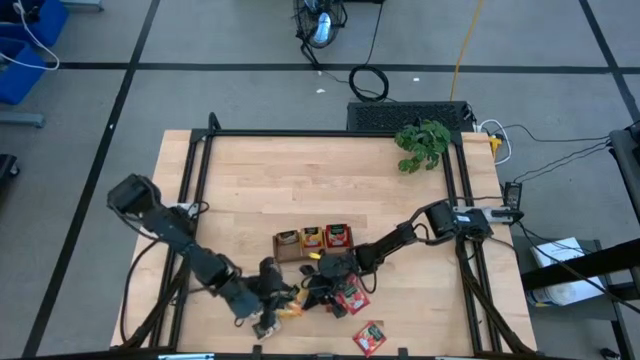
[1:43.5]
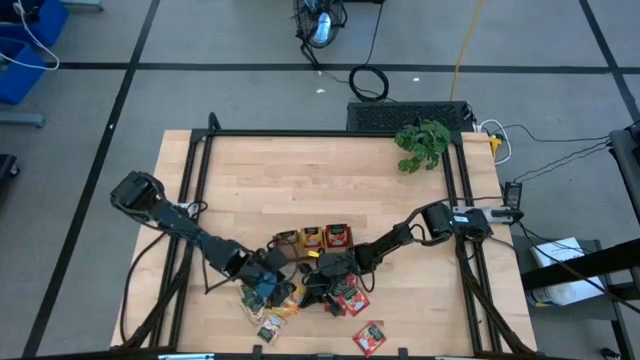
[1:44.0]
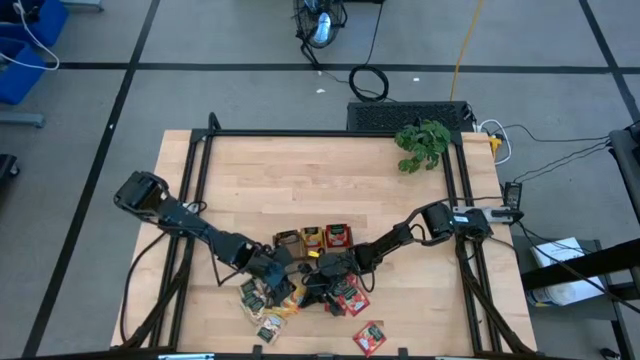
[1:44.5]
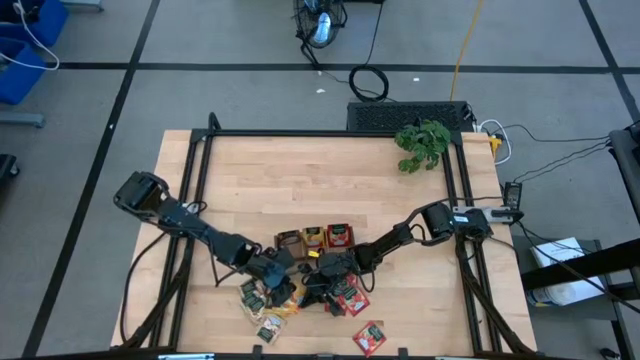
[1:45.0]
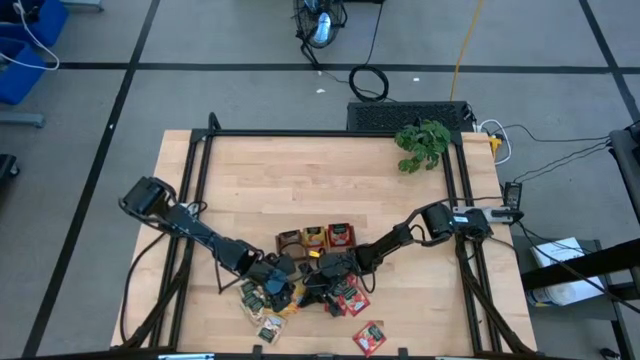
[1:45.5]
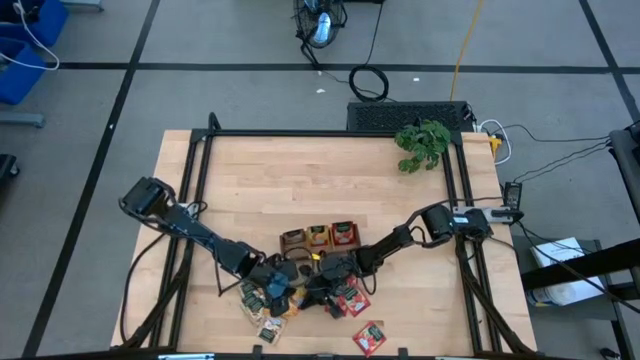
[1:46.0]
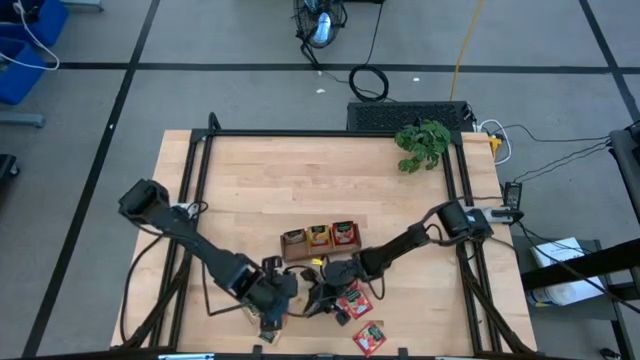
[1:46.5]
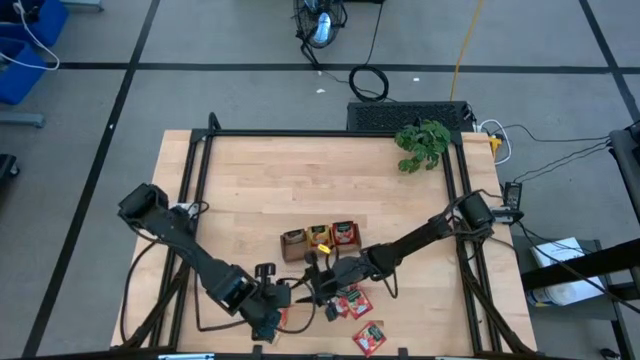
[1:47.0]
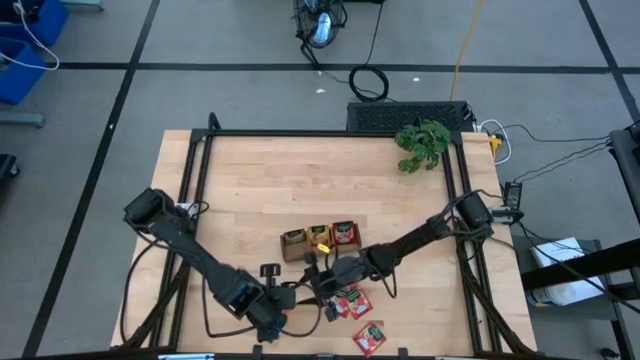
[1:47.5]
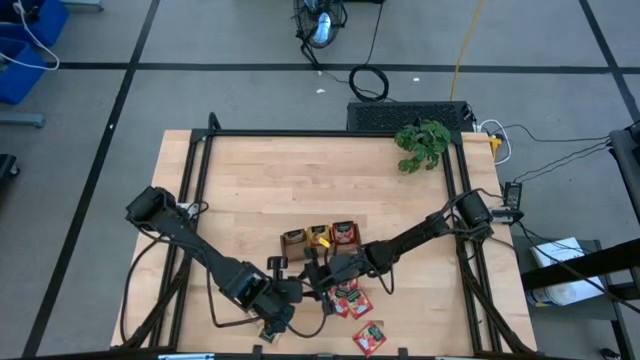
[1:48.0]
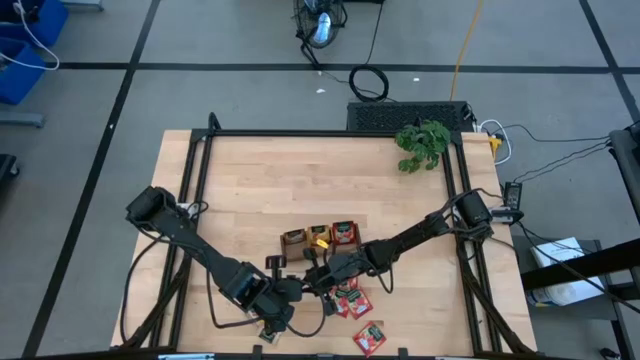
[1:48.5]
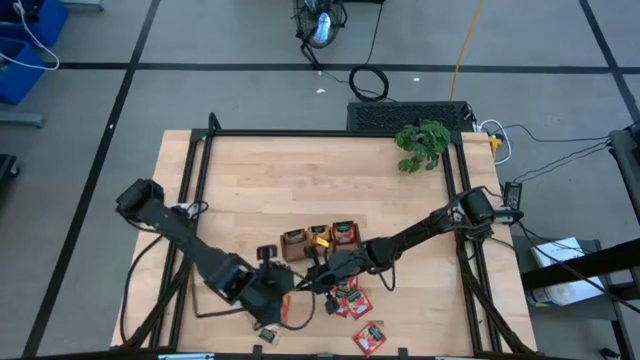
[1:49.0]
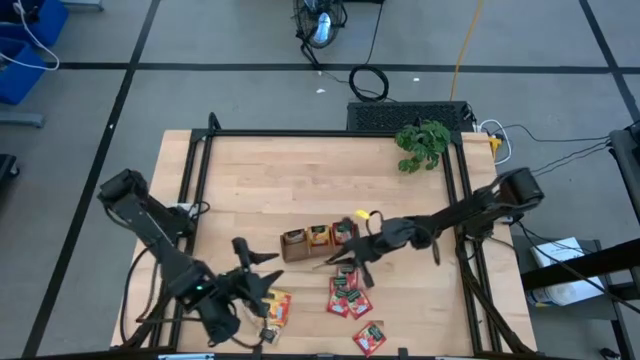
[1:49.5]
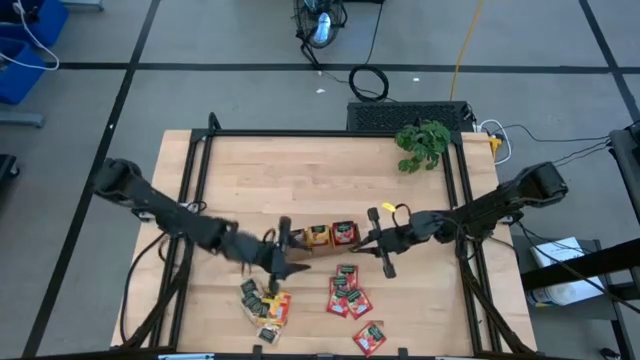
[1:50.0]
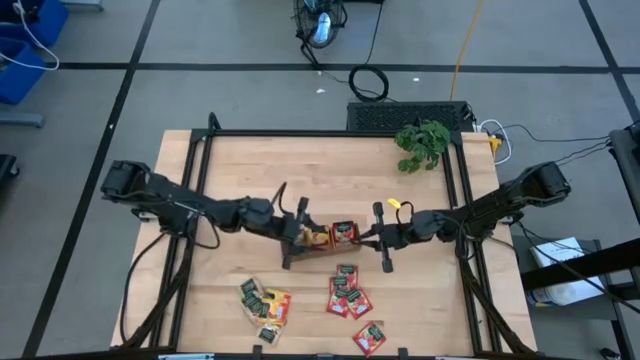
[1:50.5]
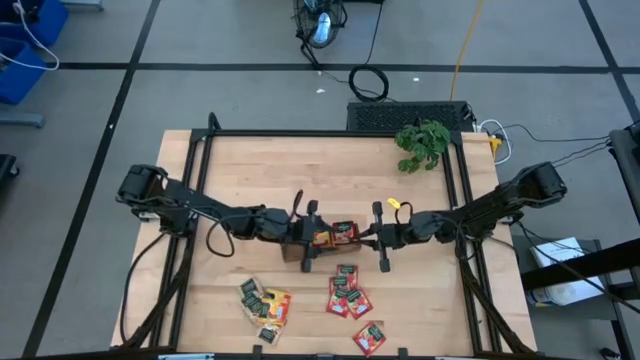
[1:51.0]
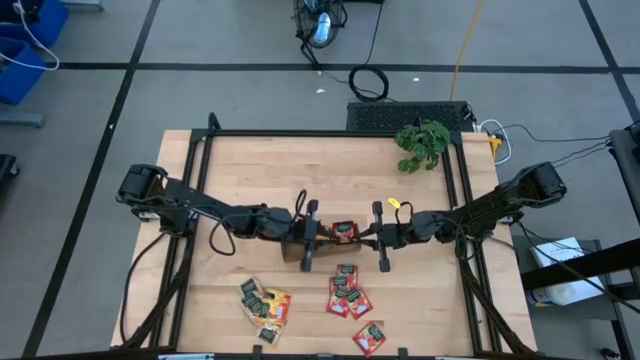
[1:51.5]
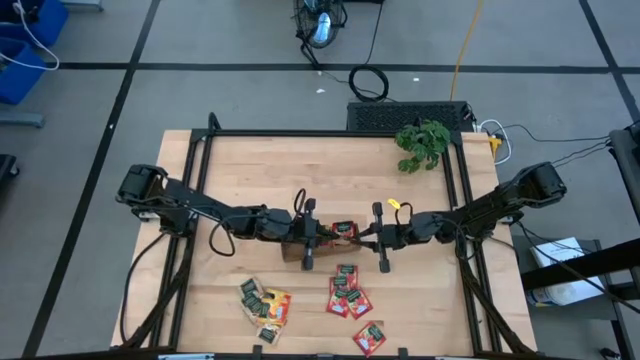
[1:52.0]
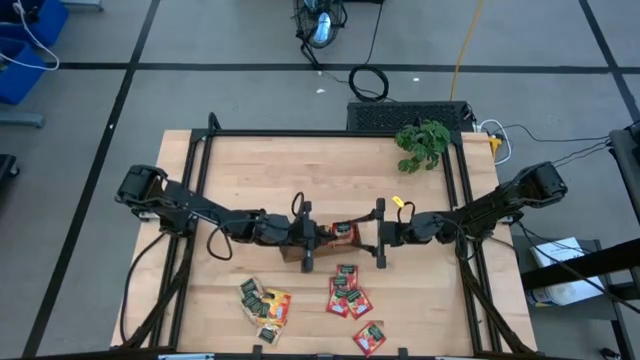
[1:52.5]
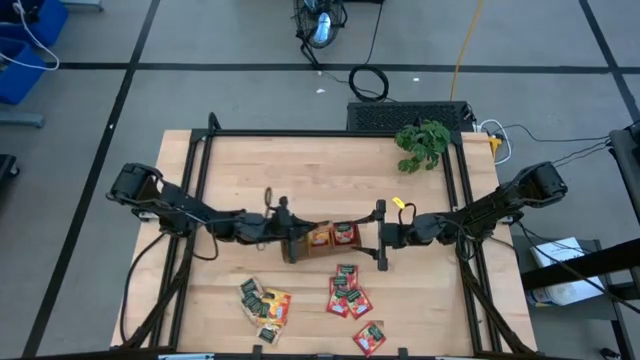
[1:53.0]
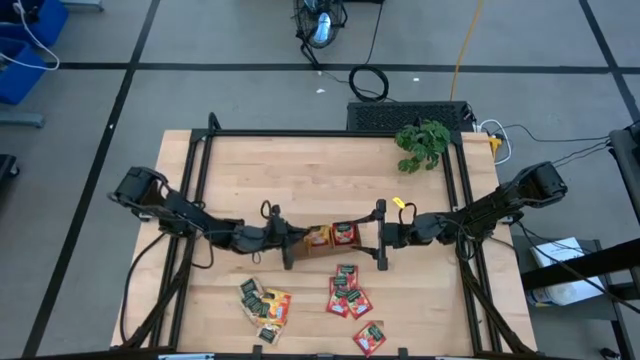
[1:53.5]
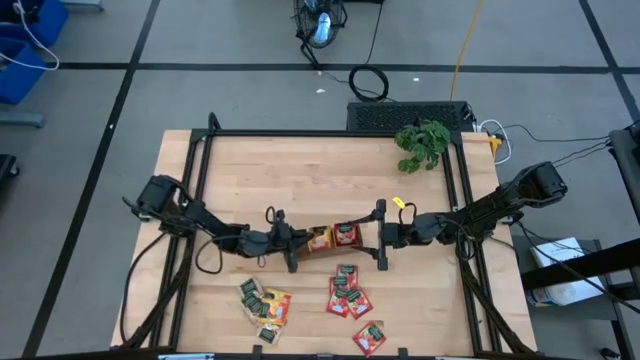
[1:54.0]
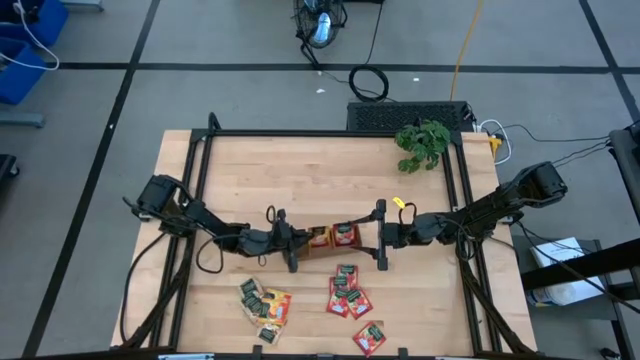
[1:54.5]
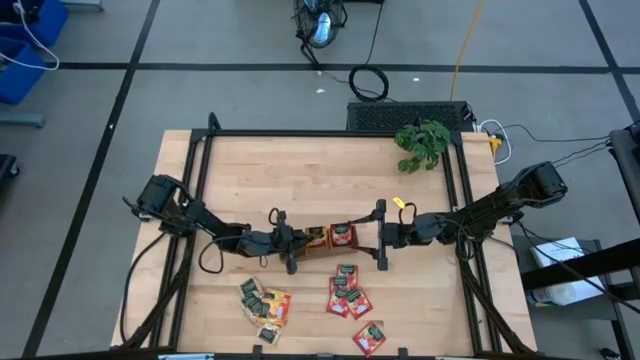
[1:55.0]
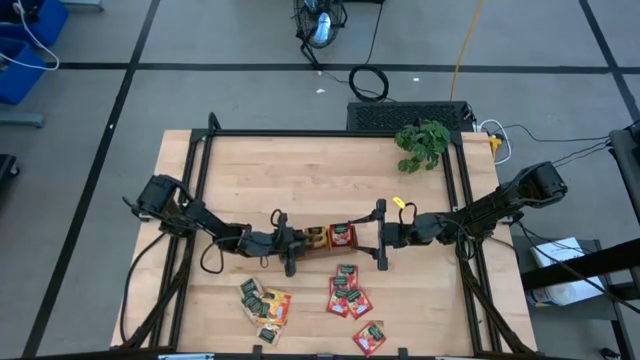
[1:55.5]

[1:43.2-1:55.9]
Task: Pick & Place Tea
Put the yellow tea bag into the middle section of the wooden organizer

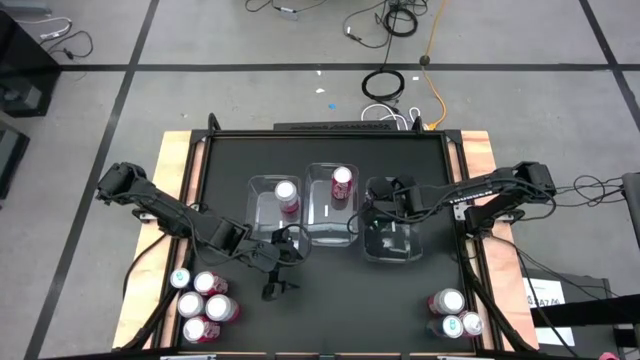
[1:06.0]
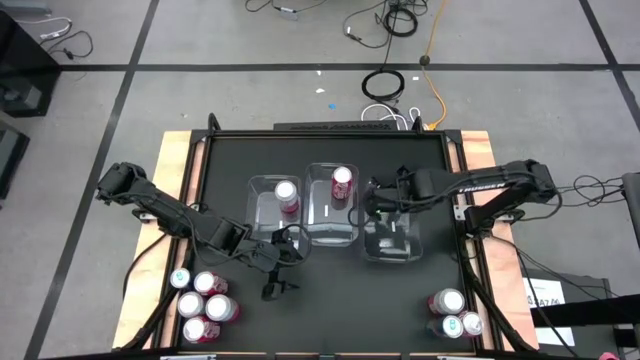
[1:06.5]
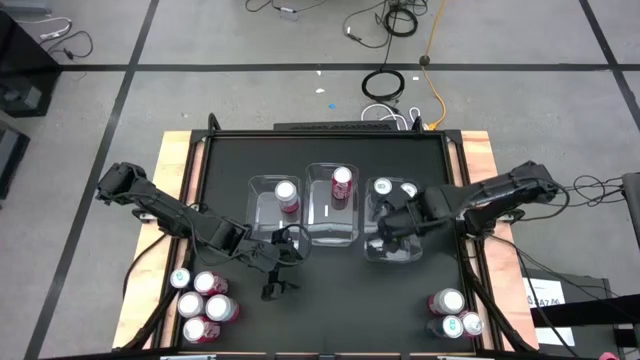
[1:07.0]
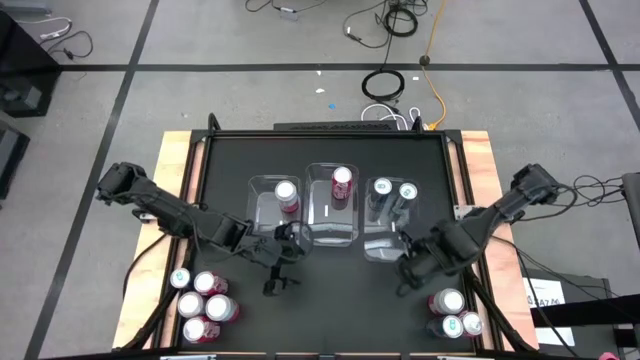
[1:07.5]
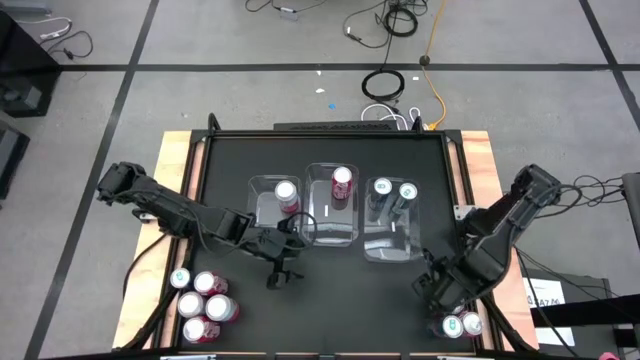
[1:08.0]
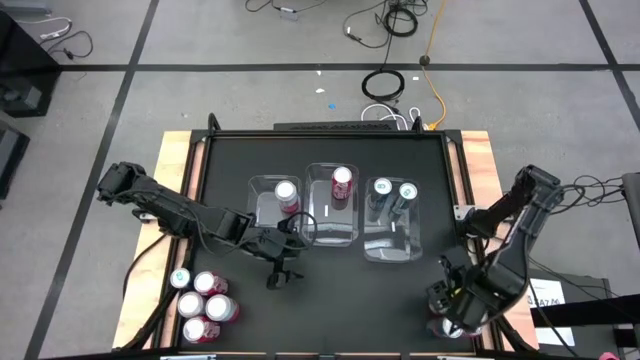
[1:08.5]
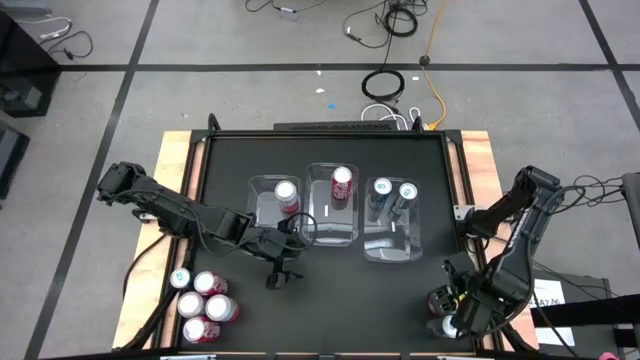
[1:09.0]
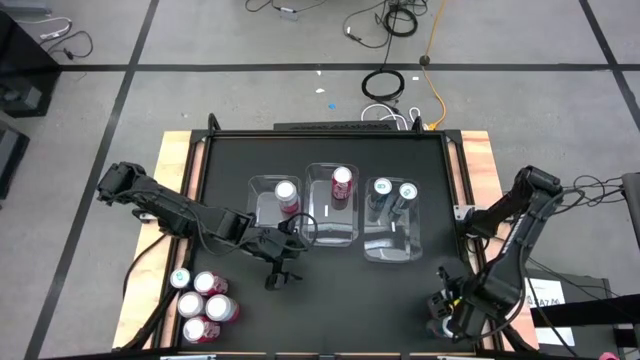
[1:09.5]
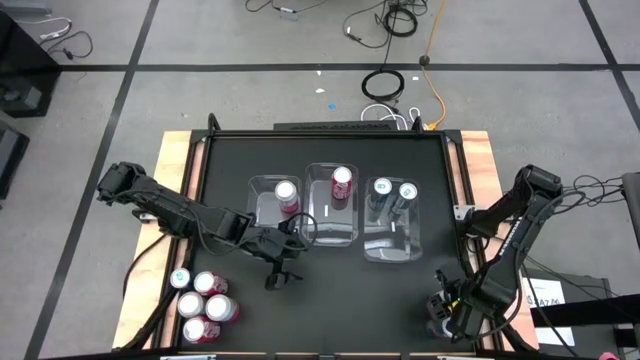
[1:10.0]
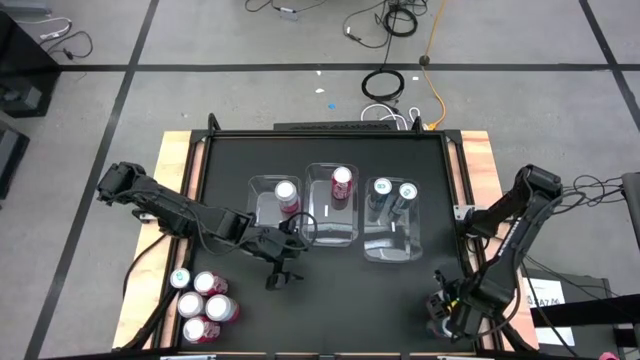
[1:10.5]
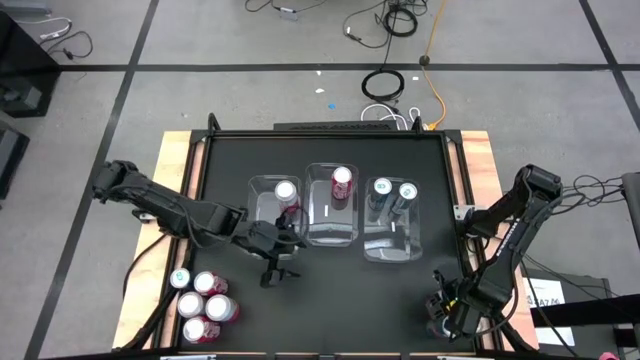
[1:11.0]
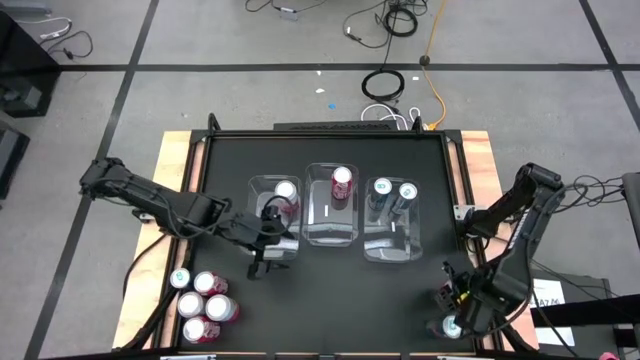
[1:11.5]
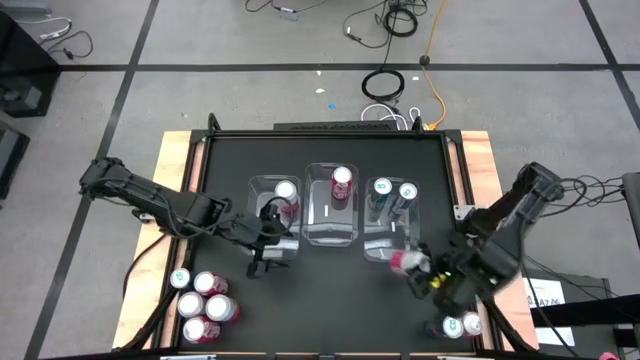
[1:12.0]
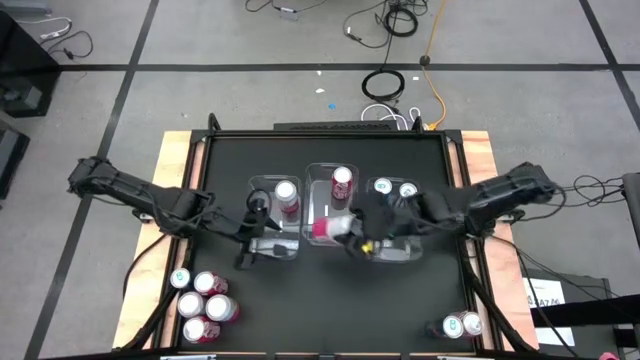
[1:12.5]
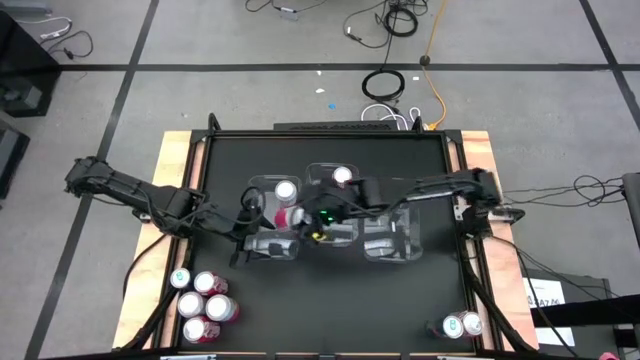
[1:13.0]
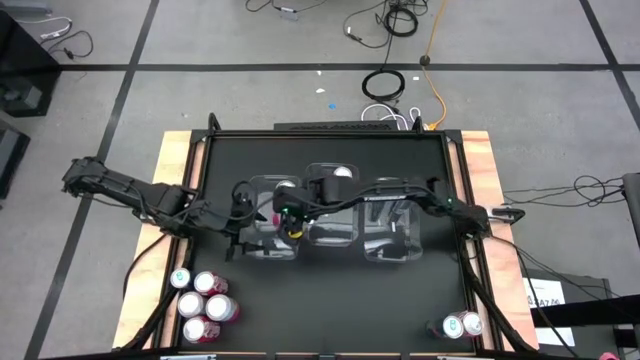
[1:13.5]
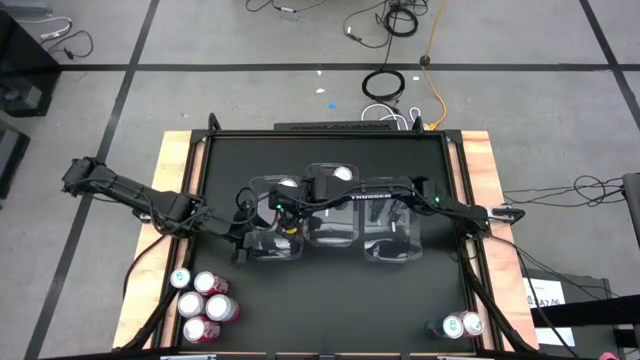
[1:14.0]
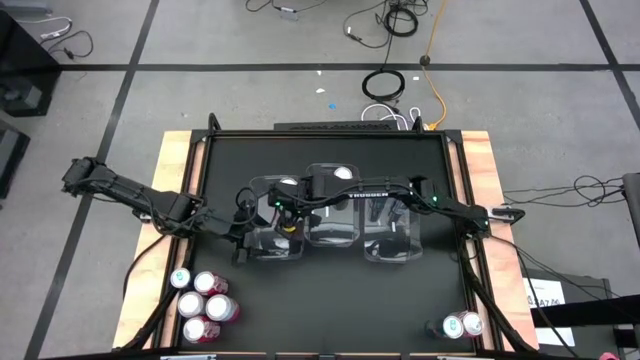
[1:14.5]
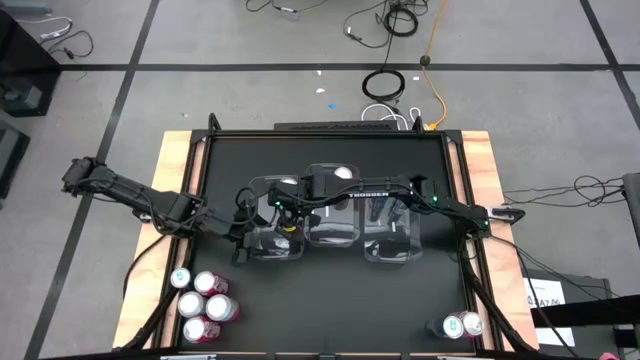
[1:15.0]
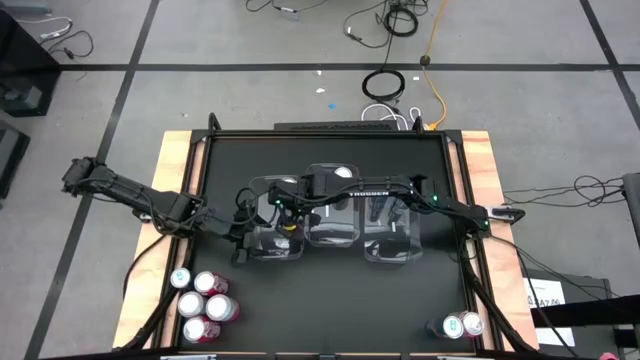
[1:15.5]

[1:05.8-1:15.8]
Task: Sort soda cans
Put the top right white orange soda can into the middle left transparent bin
